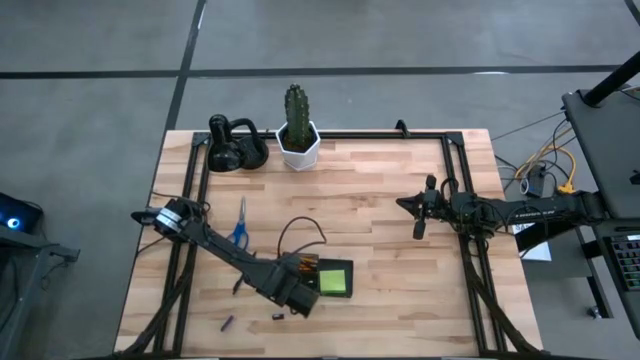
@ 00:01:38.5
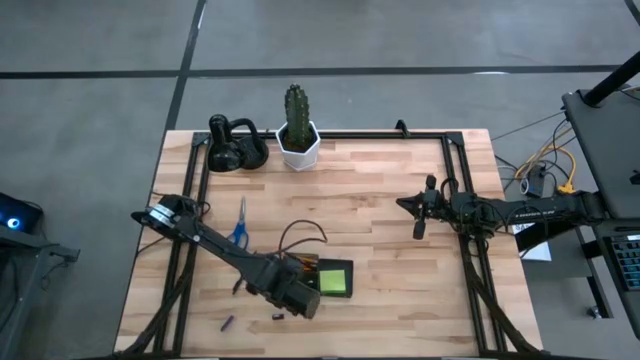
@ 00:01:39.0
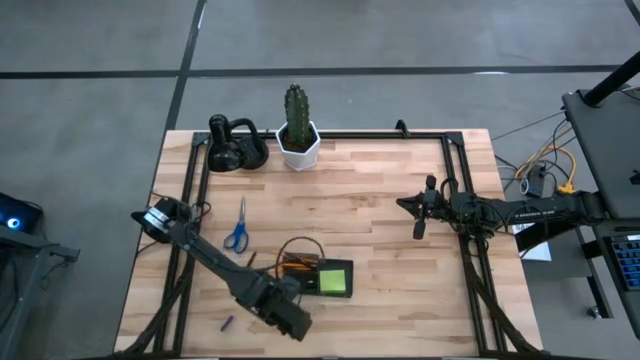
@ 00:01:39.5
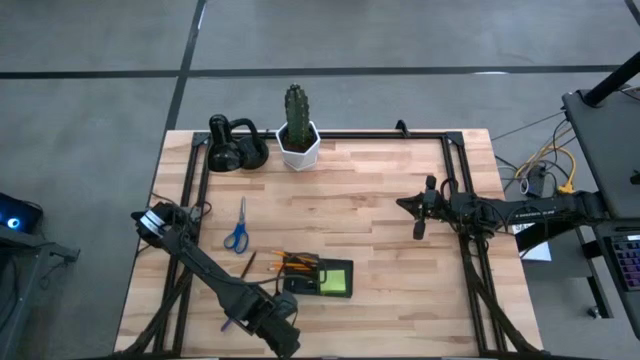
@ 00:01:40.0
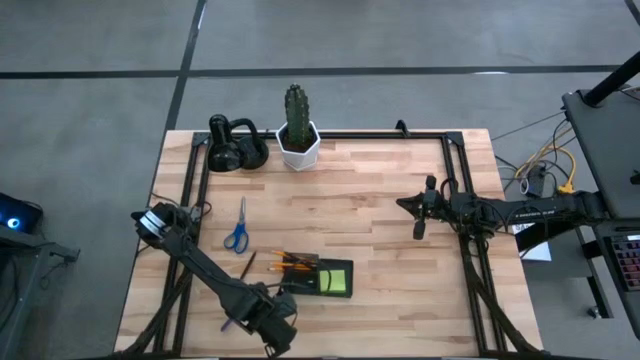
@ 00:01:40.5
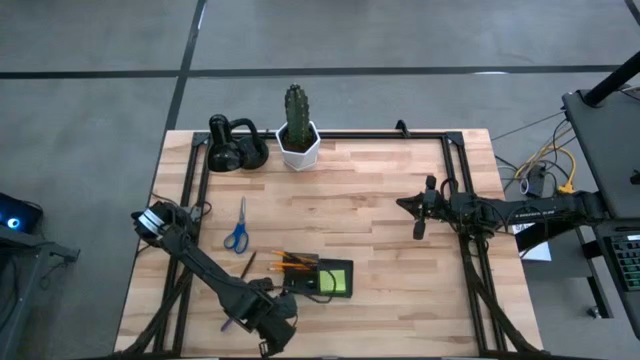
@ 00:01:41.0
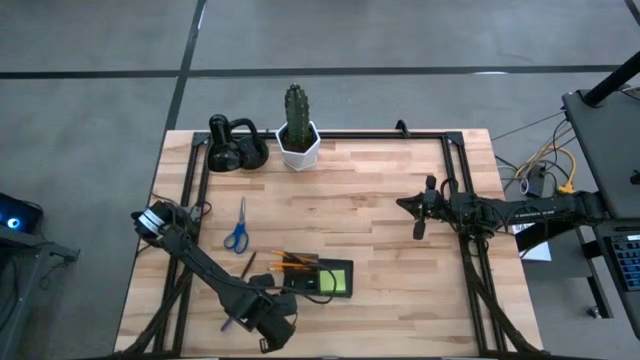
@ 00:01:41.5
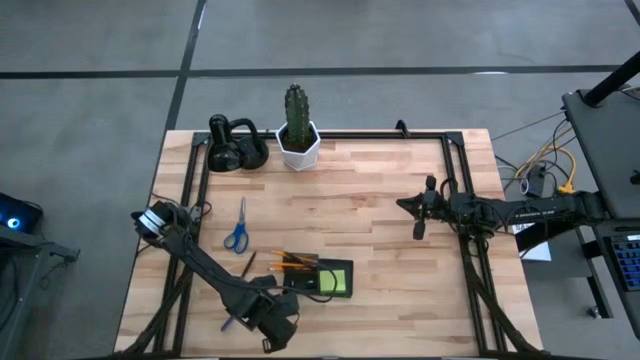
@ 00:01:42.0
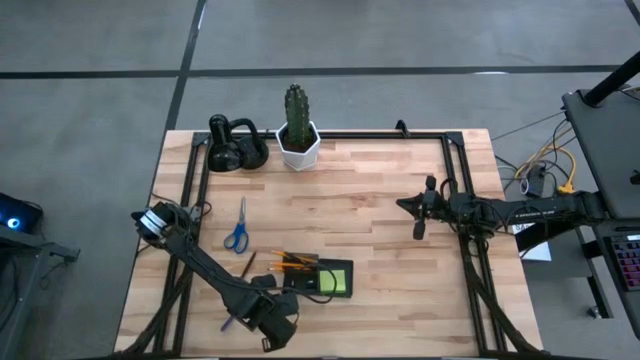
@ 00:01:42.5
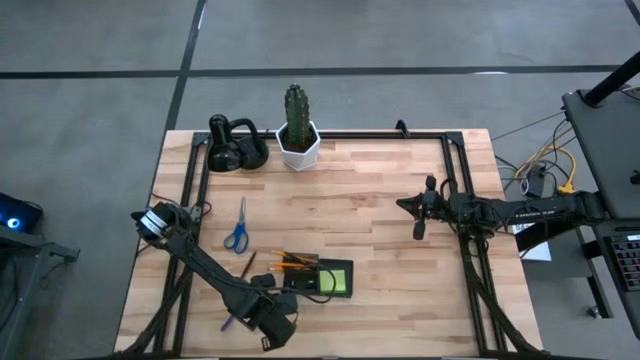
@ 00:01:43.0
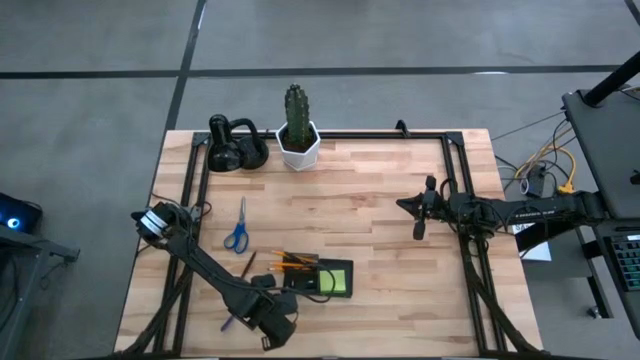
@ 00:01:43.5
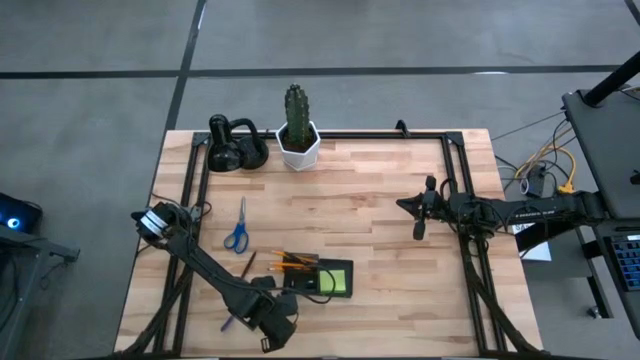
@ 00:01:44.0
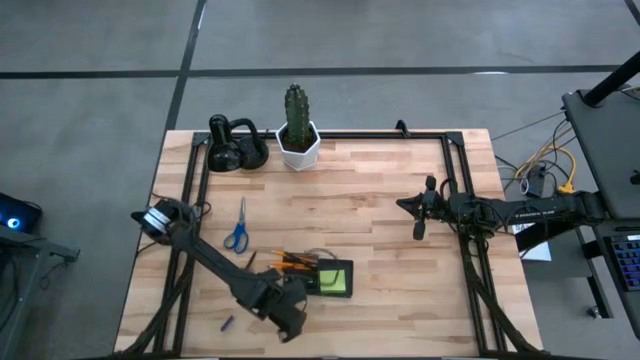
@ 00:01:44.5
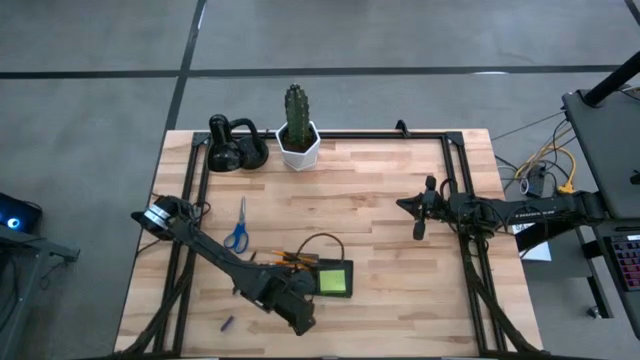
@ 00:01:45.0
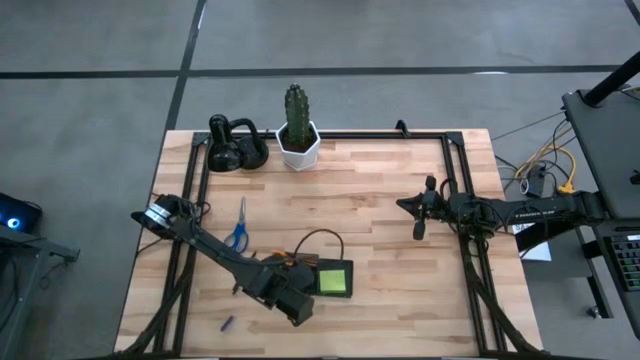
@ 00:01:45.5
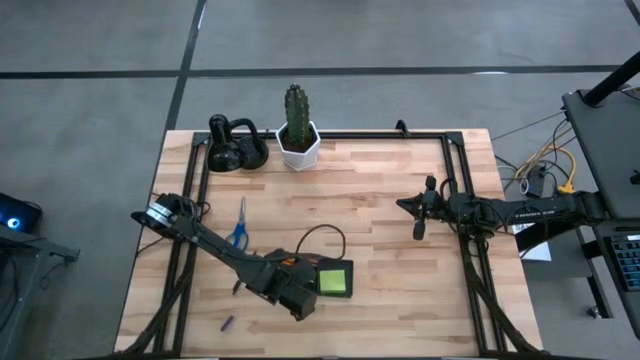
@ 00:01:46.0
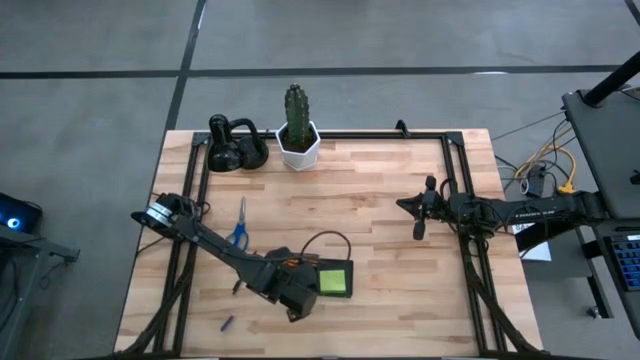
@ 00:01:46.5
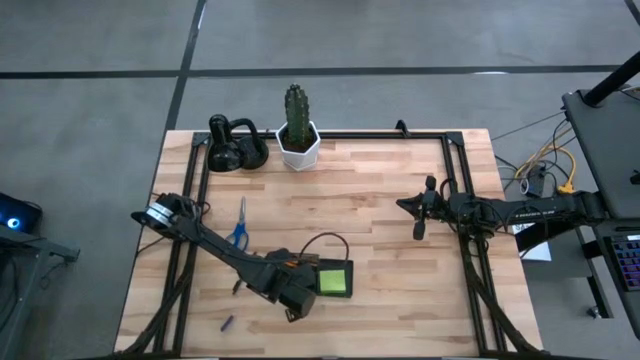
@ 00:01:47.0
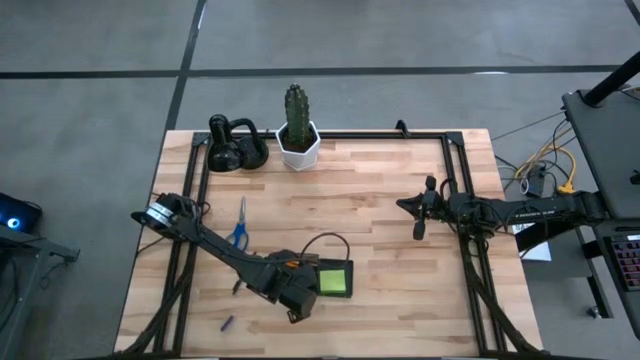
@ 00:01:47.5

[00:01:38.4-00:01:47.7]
Task: Pick and place office supplies into organizer
Put the binder clip into the desk organizer

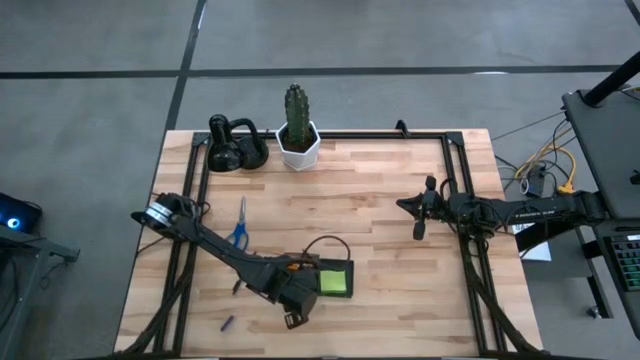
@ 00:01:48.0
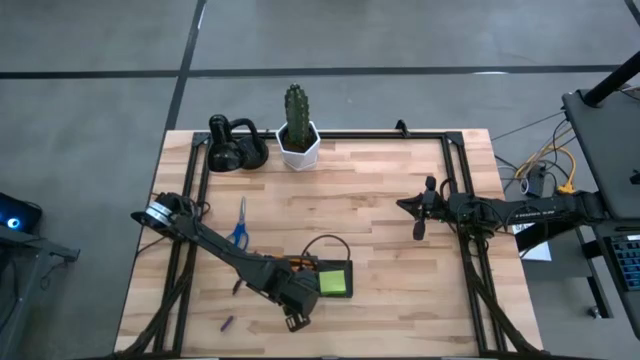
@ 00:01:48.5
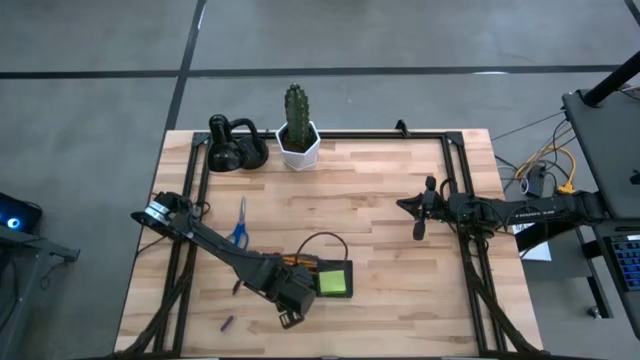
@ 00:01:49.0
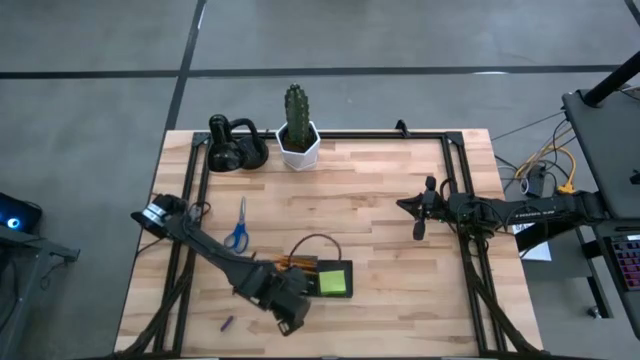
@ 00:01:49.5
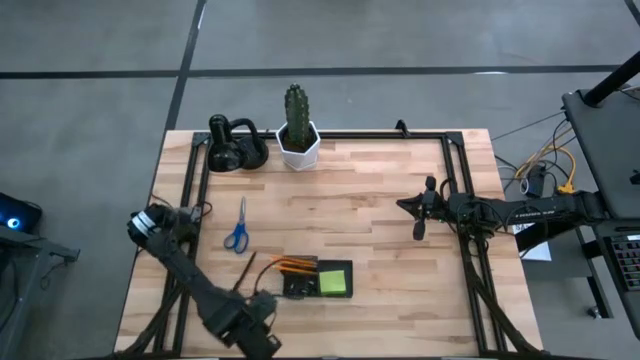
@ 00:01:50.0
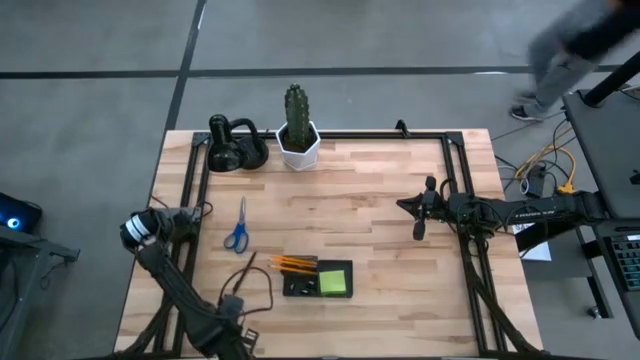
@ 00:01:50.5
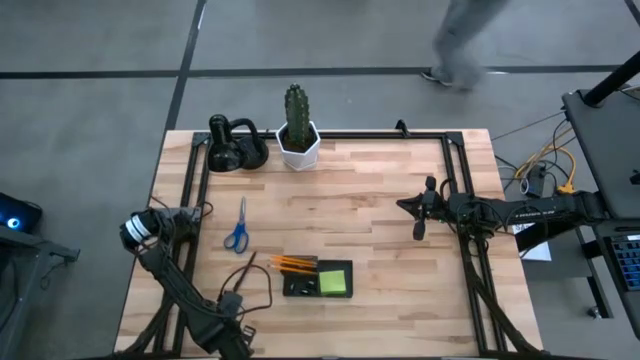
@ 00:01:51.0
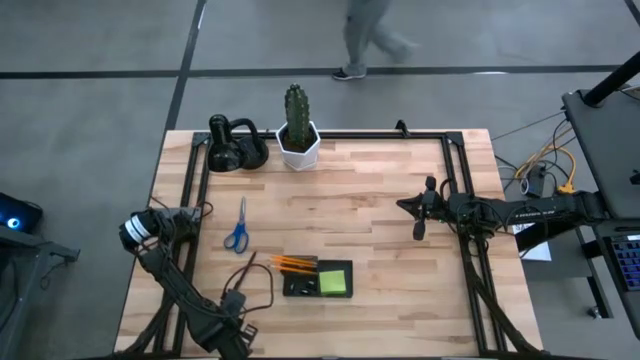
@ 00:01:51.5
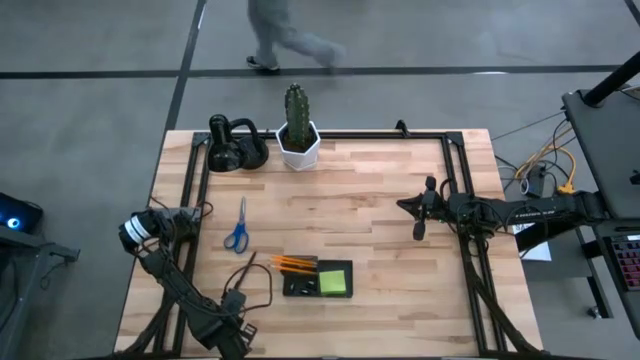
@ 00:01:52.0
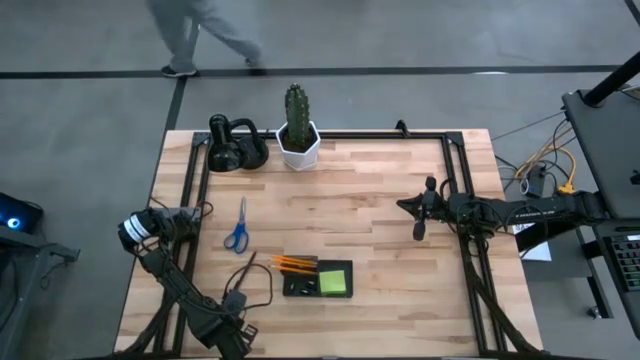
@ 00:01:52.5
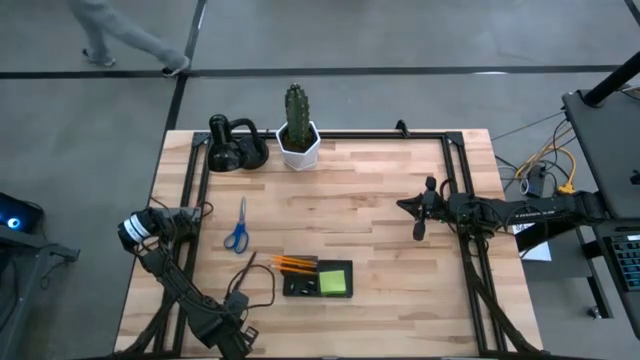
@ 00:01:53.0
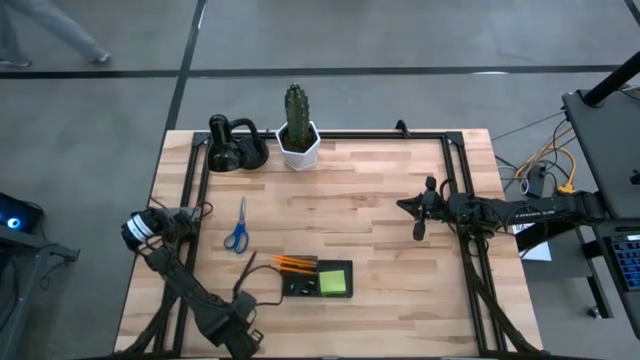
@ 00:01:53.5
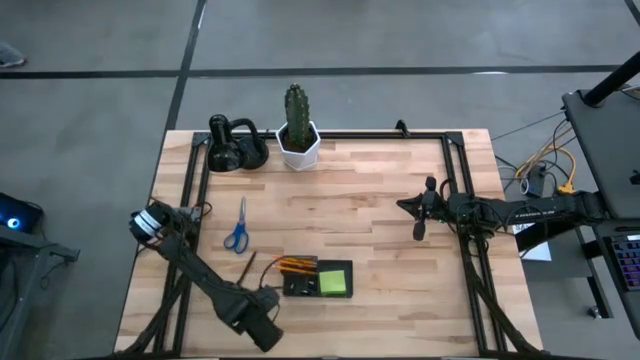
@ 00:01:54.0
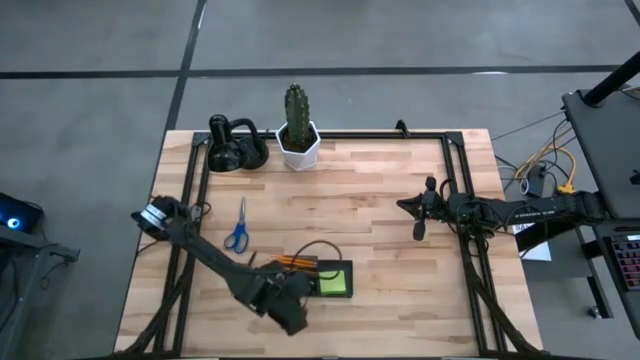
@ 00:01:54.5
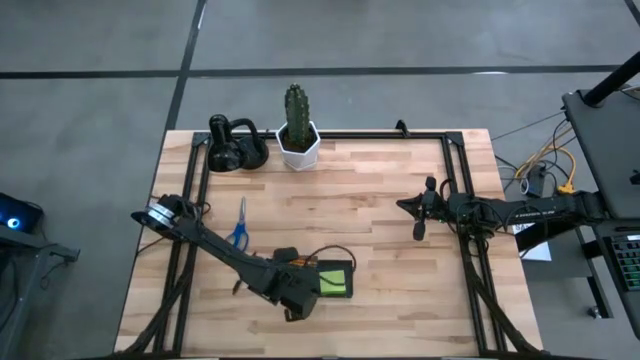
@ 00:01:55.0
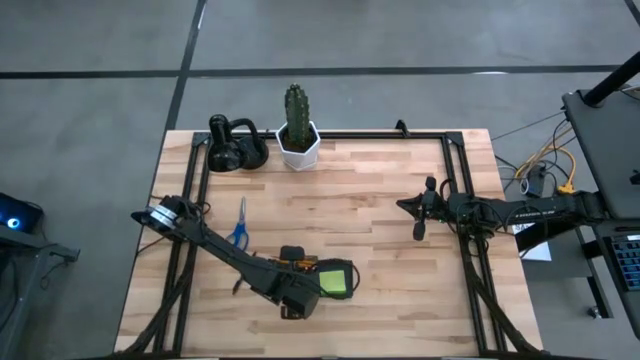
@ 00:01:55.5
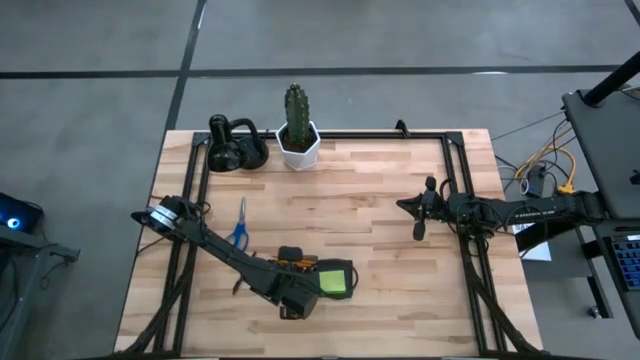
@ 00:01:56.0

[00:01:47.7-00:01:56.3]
Put the blue eraser into the desk organizer

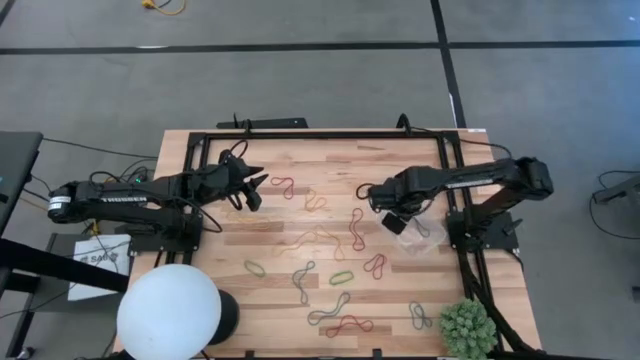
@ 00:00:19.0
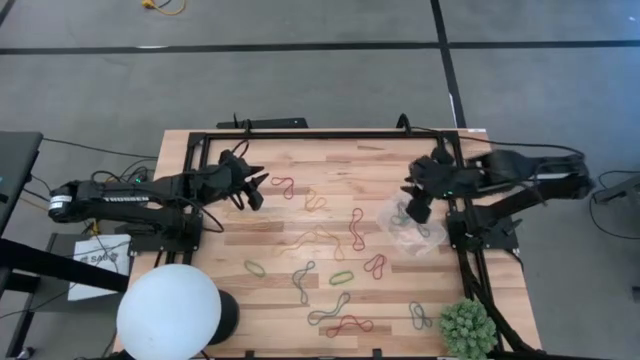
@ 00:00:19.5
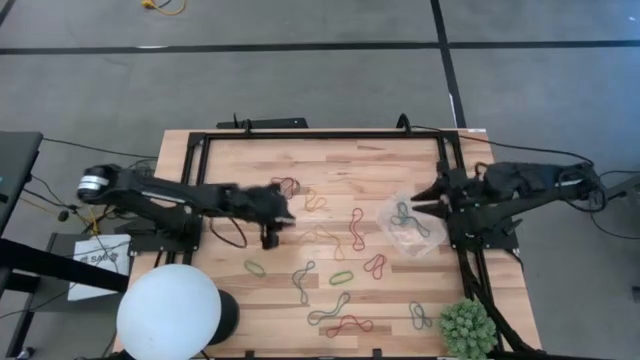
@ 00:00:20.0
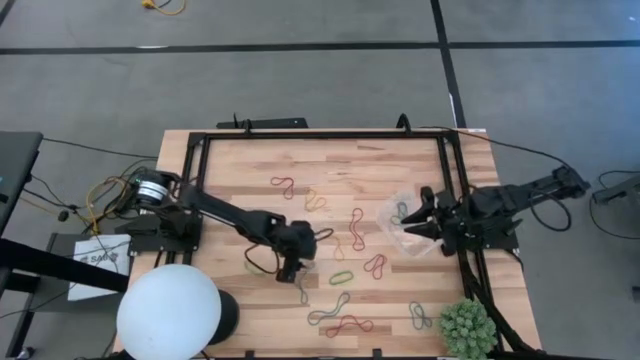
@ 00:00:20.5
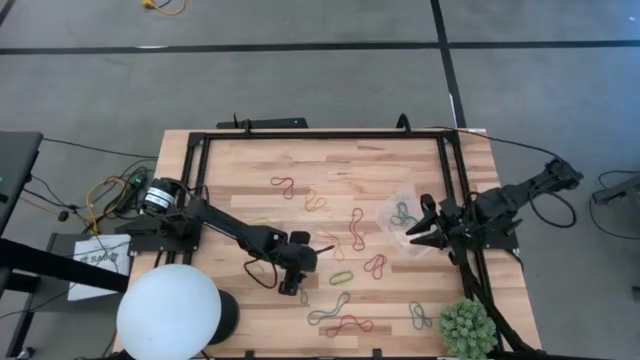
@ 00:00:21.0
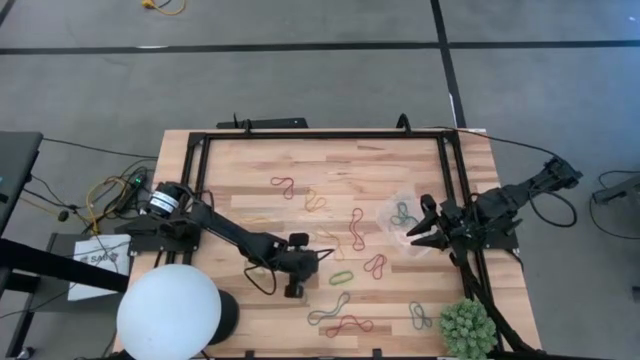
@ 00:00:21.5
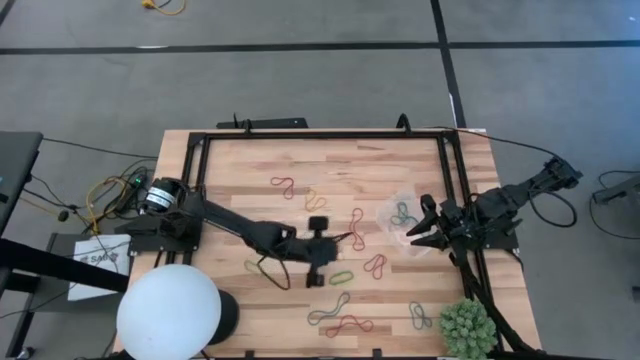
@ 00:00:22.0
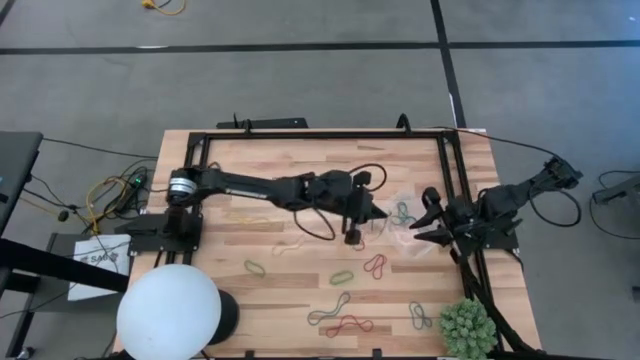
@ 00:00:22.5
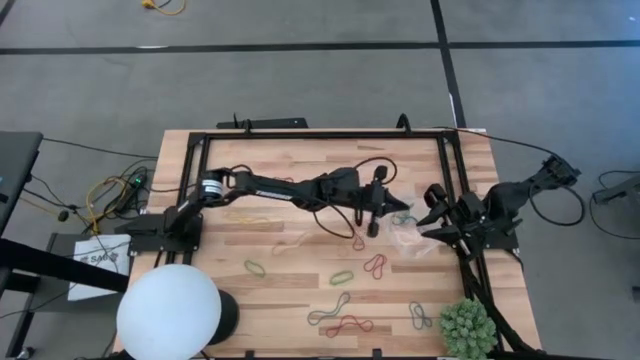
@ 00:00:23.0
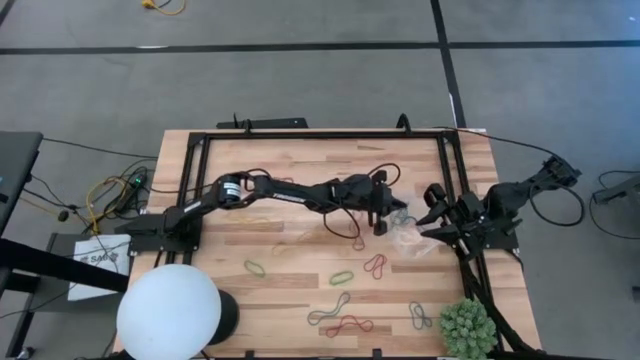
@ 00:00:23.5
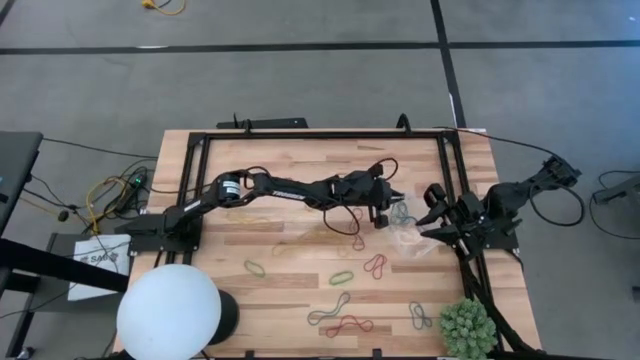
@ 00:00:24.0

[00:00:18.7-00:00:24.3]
Task: Pick and place items into bin
Put the blue rubber band into the transparent bin
